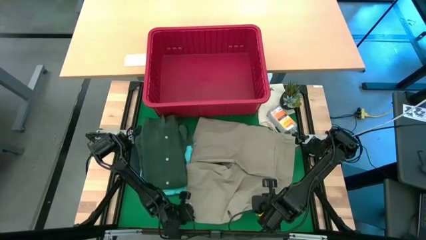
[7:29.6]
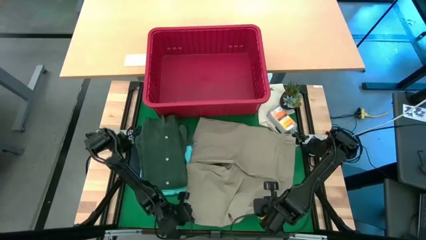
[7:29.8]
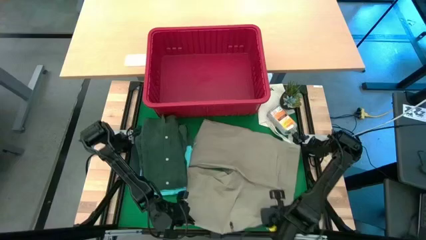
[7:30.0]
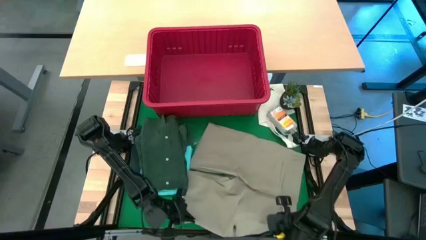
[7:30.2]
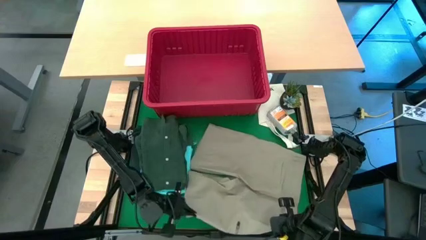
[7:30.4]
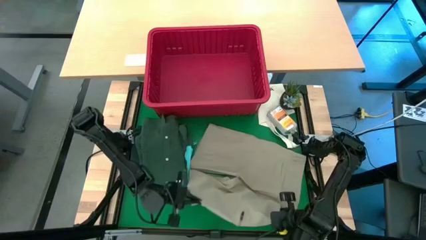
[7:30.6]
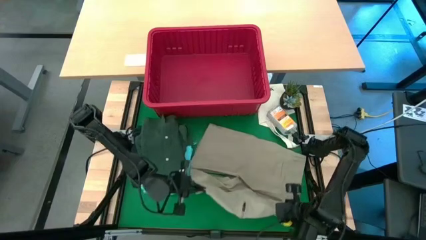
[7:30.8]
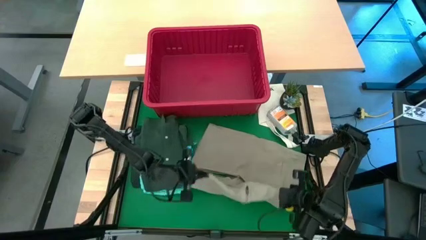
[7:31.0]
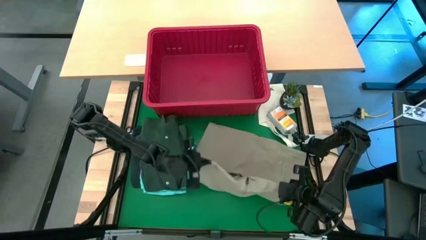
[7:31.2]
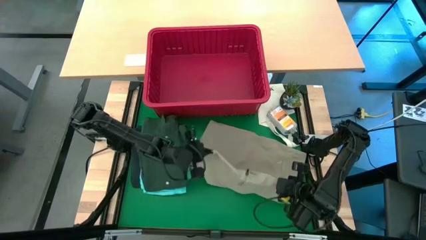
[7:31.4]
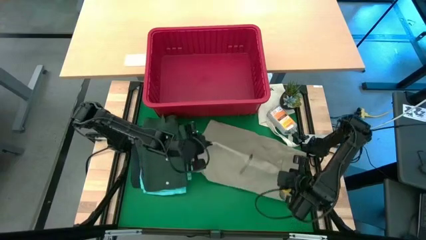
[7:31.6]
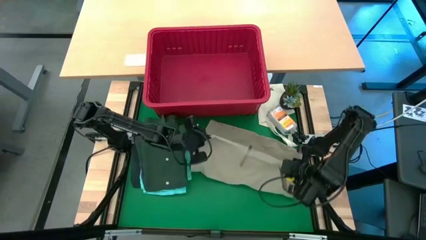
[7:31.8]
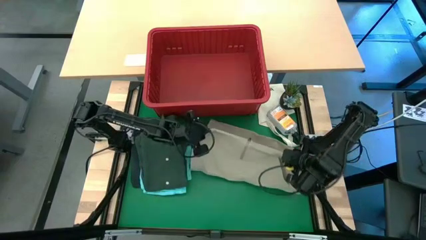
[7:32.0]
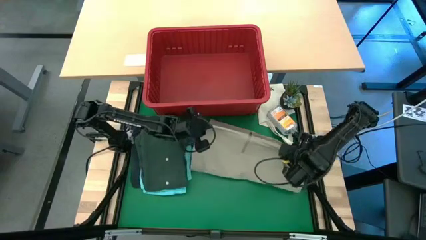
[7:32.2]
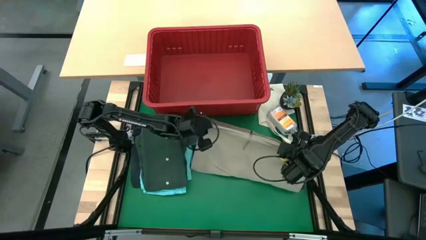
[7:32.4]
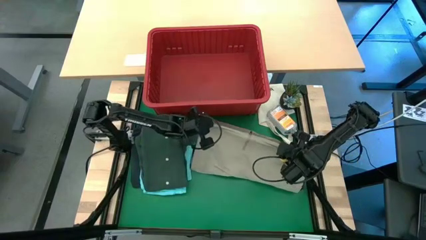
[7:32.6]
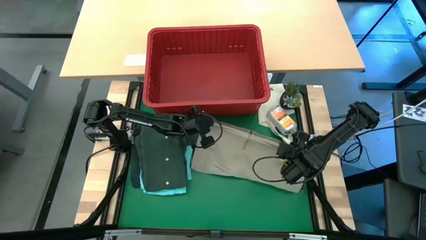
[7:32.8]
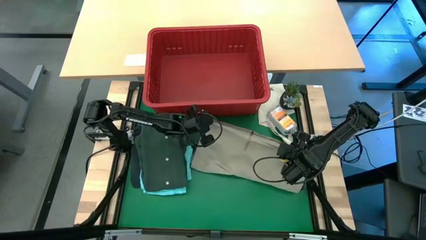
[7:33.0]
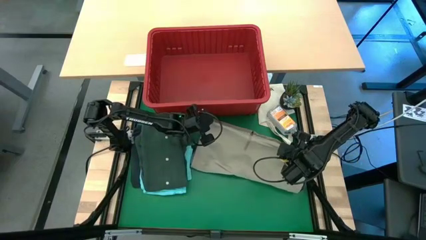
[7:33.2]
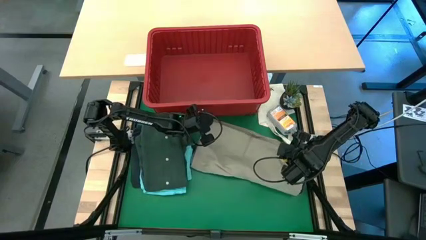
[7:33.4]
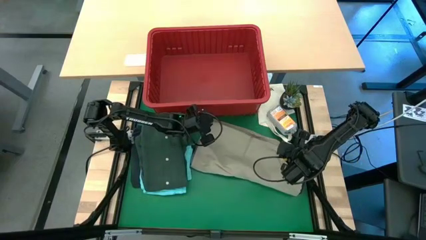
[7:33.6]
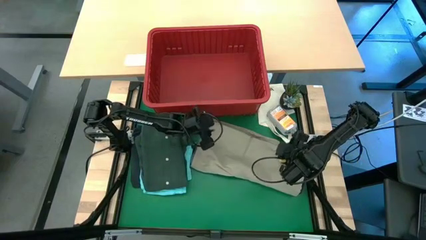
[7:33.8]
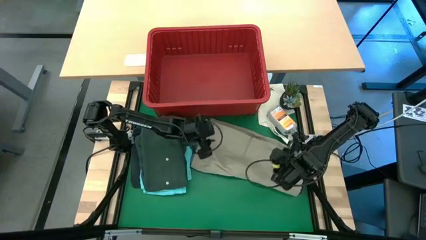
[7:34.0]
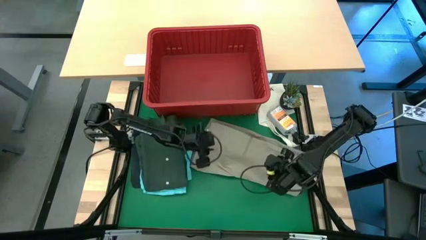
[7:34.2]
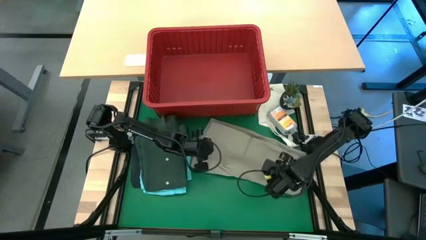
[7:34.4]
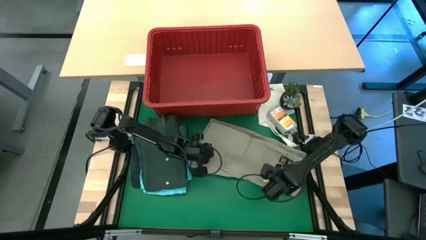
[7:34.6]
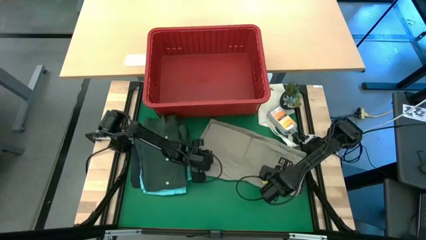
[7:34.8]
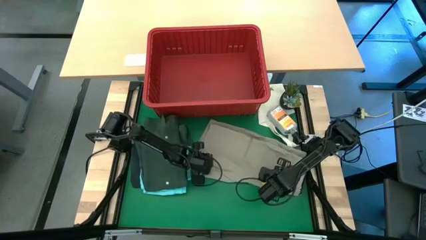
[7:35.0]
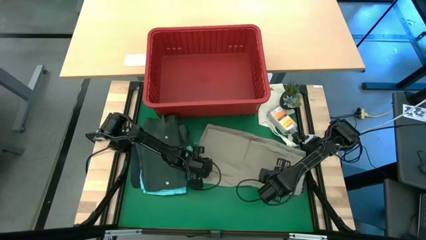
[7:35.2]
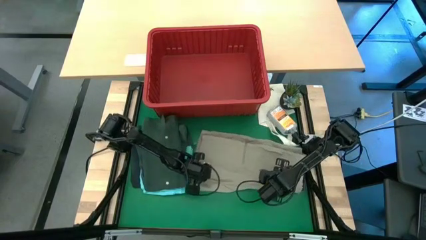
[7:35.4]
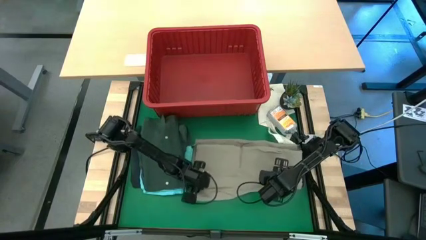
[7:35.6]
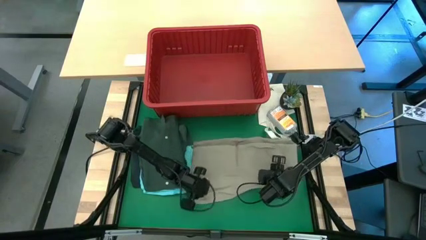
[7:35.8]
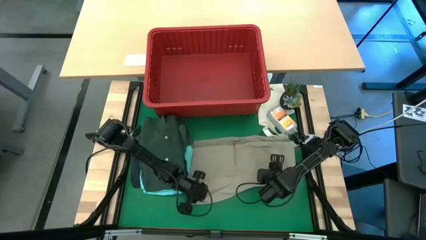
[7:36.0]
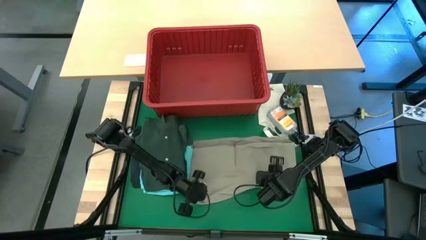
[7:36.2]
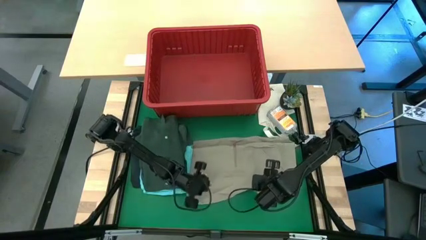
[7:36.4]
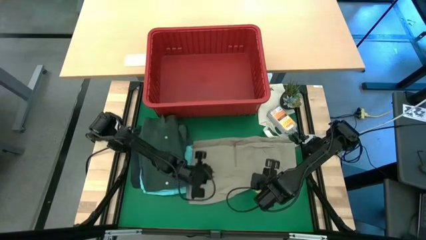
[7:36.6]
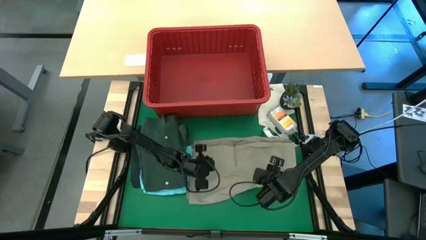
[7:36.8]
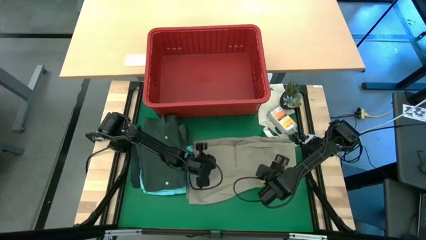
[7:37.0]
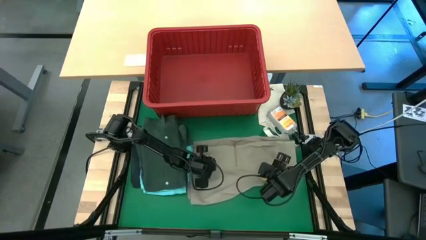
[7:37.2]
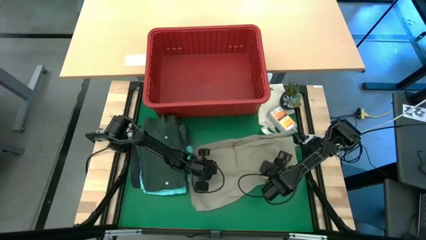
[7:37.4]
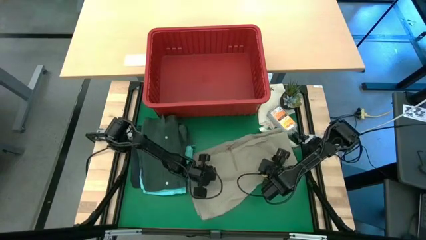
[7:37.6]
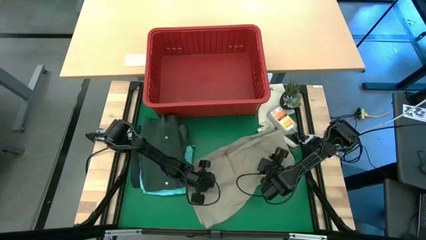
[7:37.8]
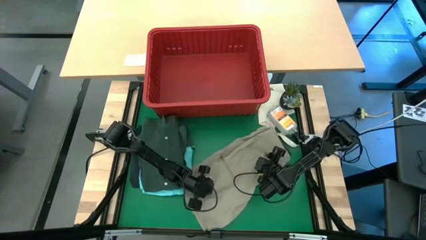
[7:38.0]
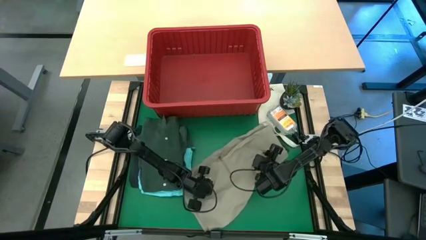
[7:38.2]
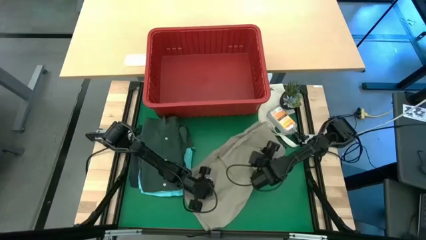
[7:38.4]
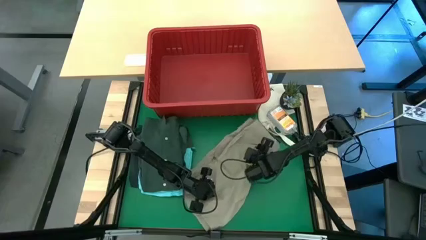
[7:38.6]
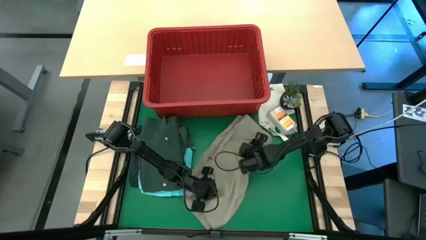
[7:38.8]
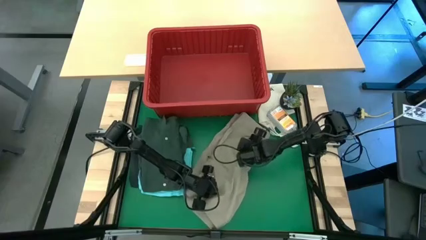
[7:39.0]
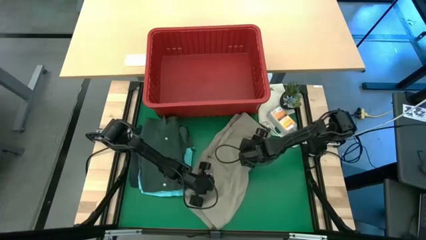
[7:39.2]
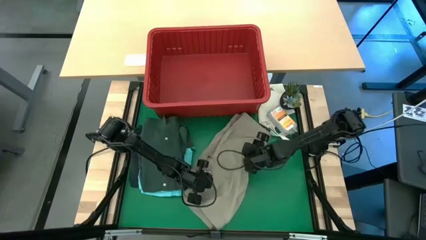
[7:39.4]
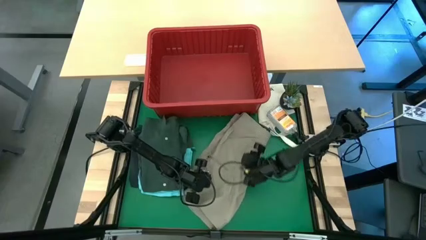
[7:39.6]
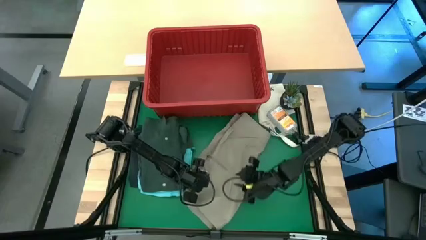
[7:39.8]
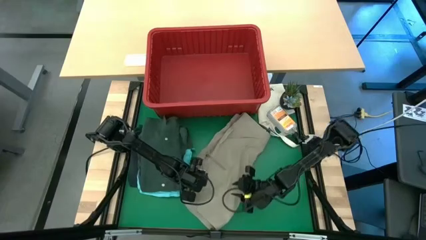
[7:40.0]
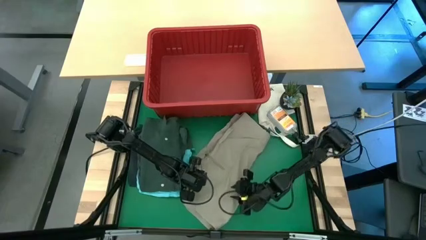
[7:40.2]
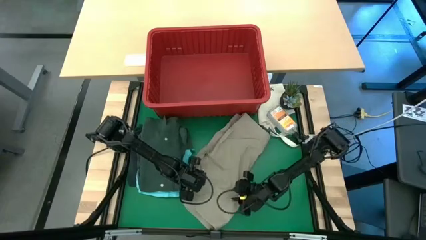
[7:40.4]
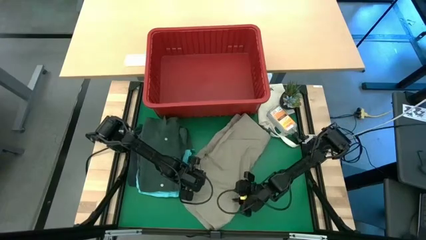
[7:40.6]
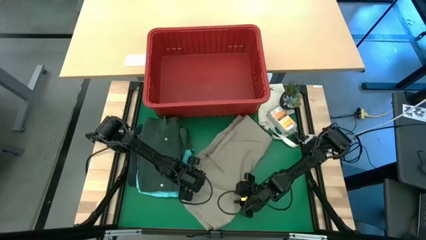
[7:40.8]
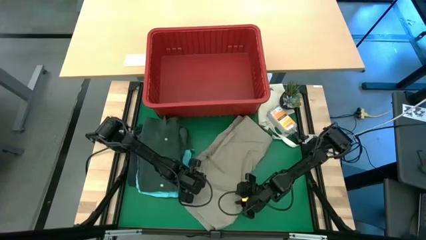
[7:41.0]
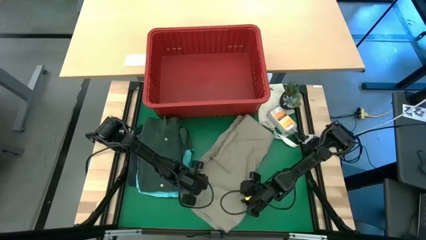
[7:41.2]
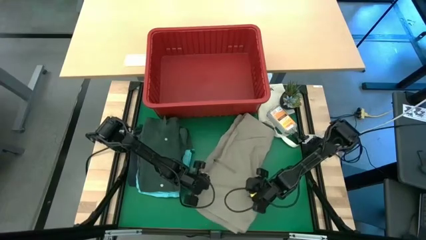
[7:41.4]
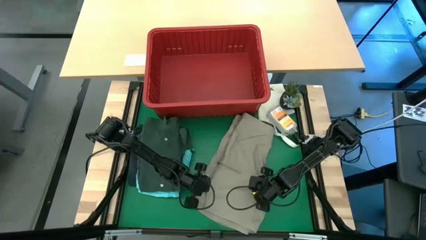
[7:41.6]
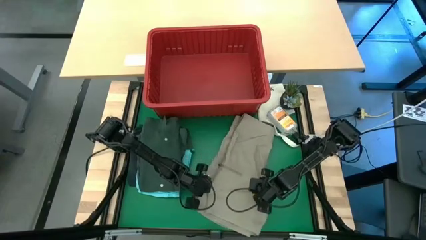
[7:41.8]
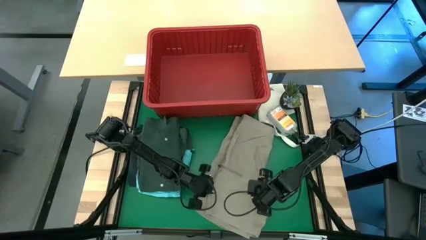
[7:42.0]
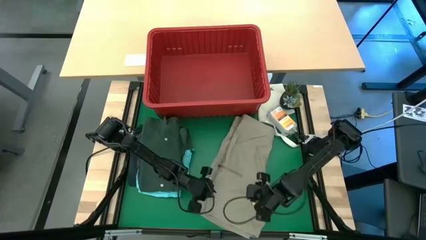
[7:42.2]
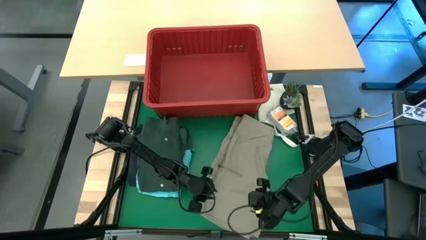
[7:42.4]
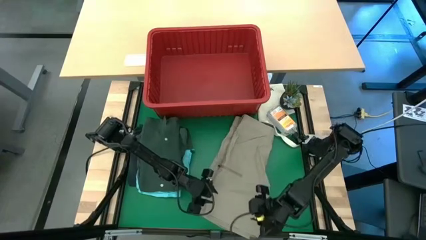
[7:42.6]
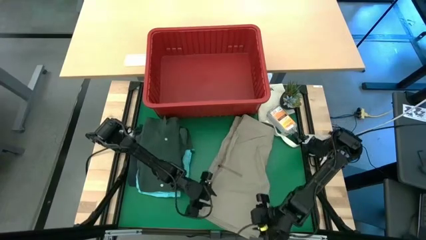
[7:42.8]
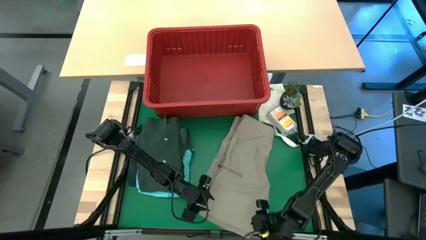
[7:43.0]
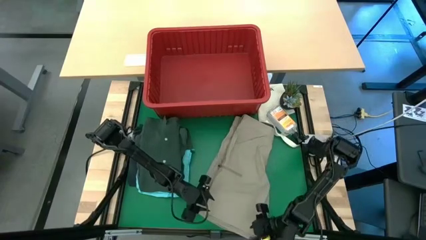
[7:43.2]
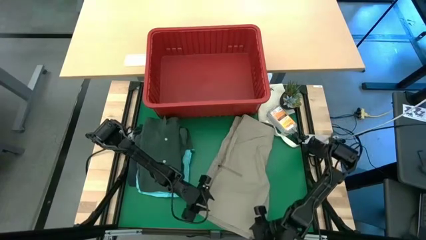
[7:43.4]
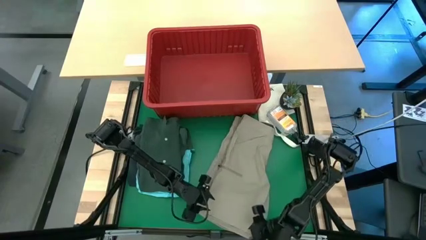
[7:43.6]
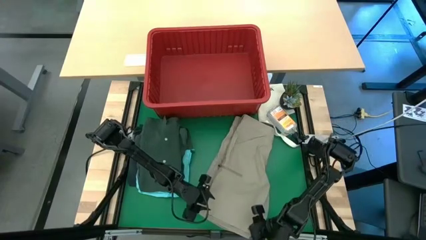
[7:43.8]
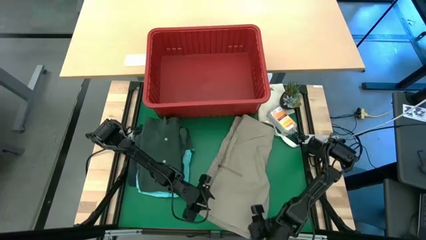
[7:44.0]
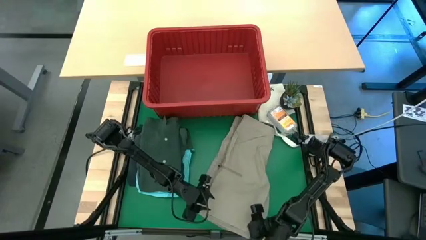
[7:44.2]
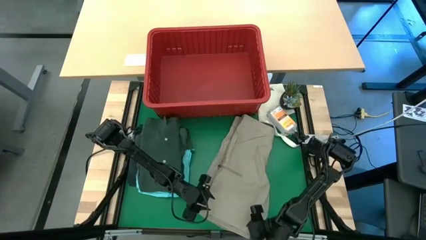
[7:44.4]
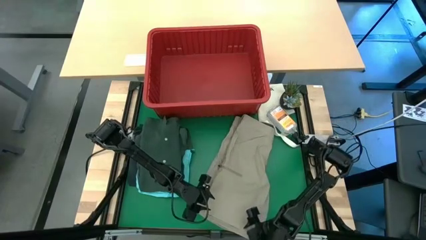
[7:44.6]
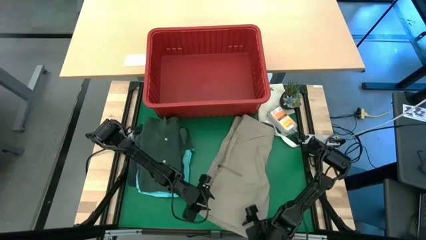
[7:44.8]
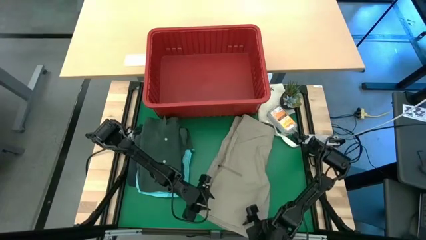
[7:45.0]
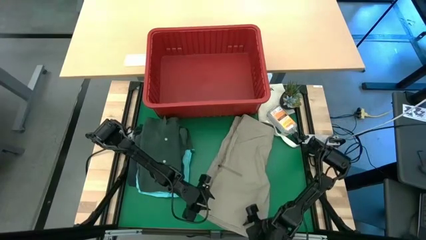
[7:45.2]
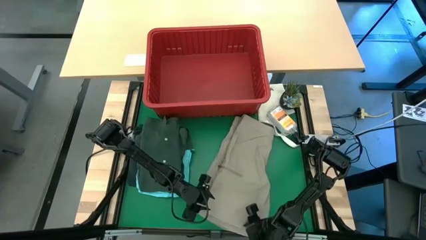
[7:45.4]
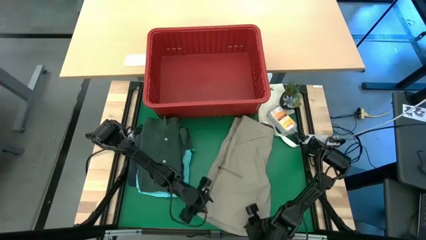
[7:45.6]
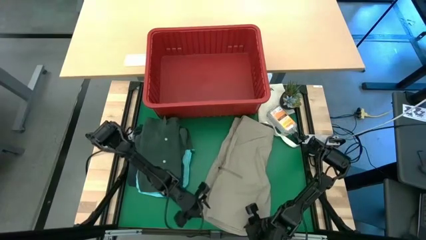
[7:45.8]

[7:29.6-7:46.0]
Task: Fold Laundry from Bin
Fold the brown shorts from the red laundry bin
